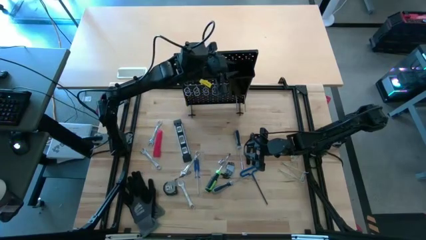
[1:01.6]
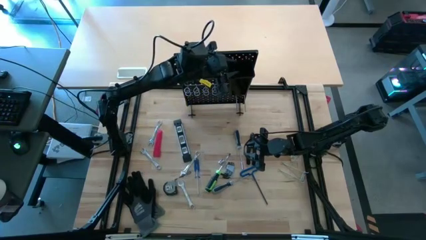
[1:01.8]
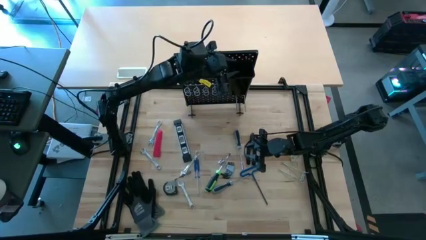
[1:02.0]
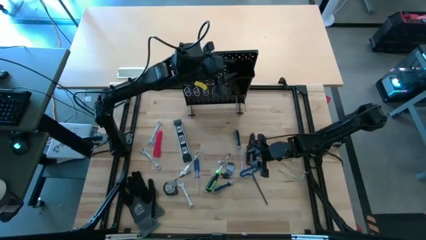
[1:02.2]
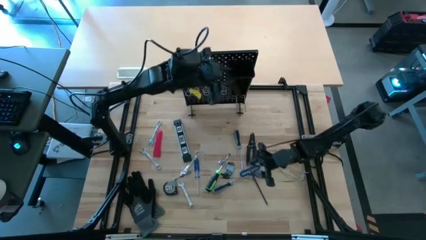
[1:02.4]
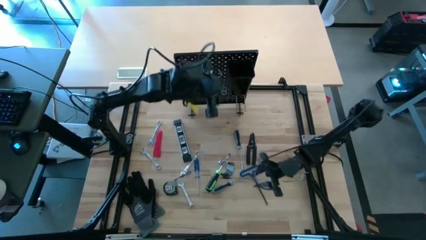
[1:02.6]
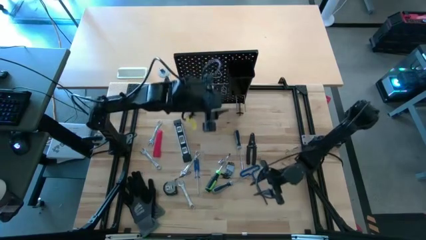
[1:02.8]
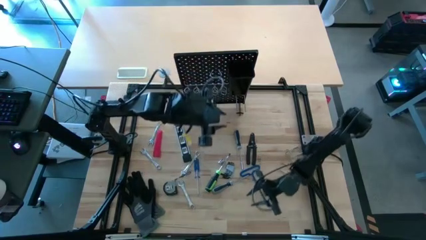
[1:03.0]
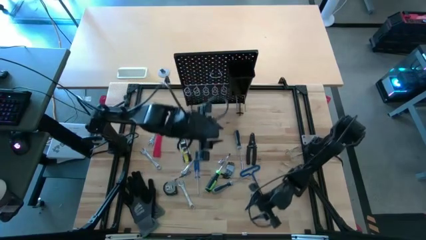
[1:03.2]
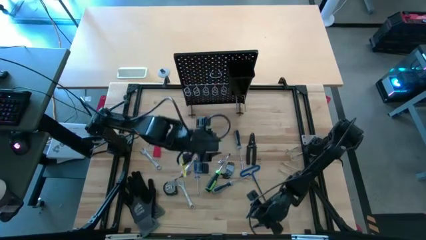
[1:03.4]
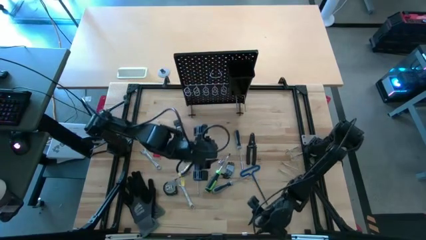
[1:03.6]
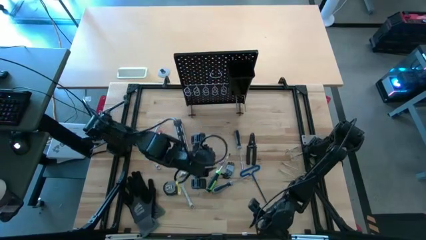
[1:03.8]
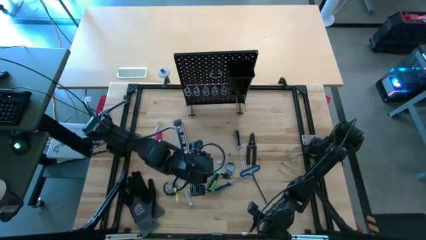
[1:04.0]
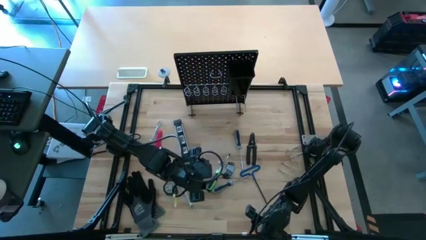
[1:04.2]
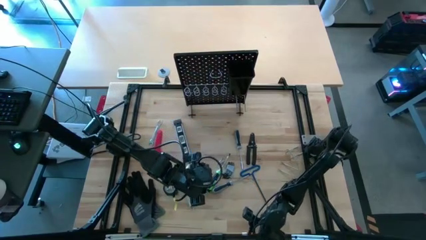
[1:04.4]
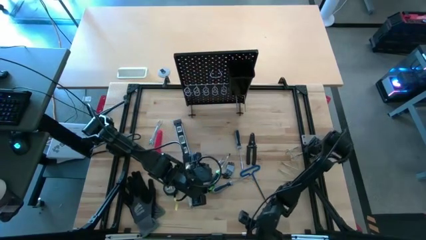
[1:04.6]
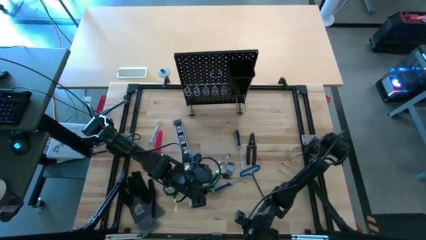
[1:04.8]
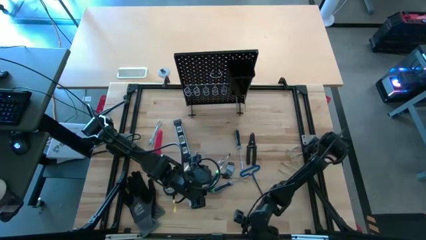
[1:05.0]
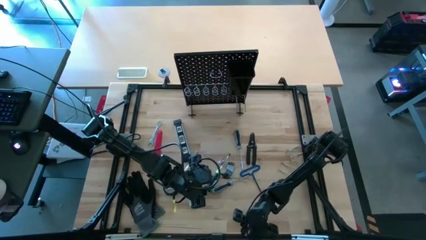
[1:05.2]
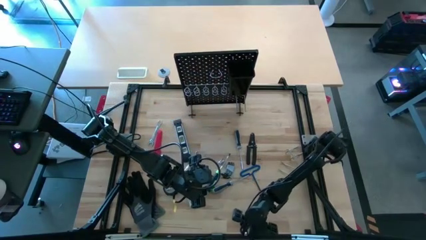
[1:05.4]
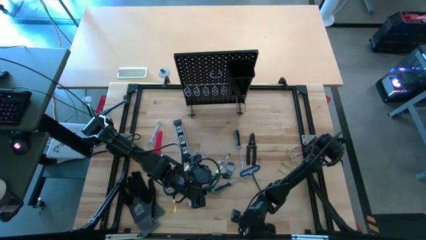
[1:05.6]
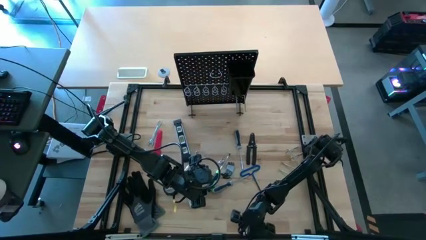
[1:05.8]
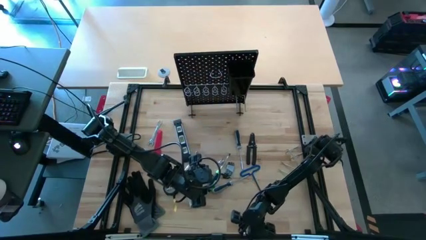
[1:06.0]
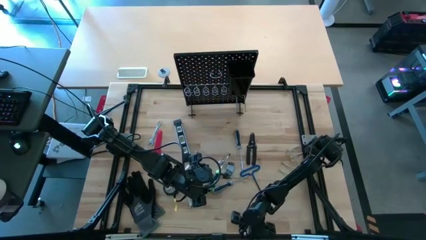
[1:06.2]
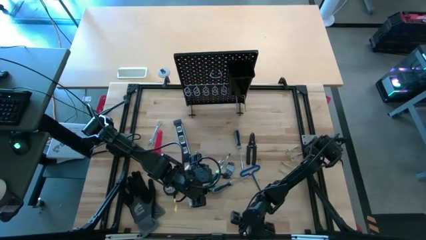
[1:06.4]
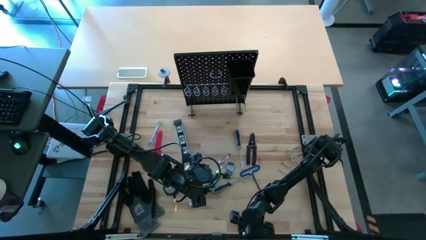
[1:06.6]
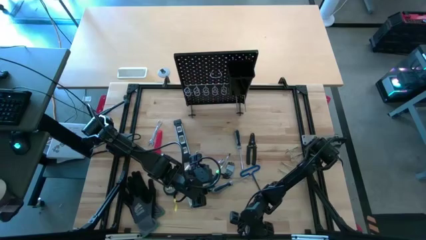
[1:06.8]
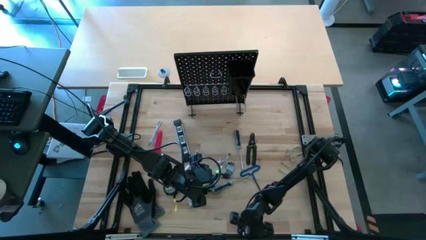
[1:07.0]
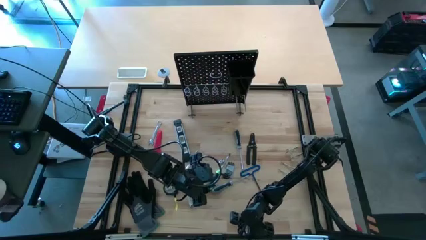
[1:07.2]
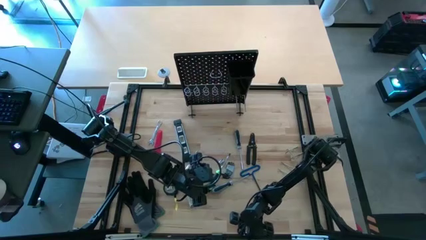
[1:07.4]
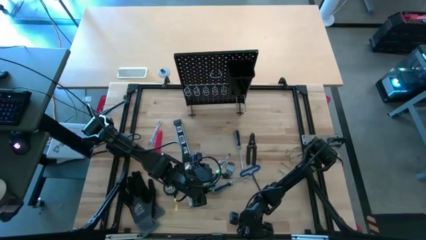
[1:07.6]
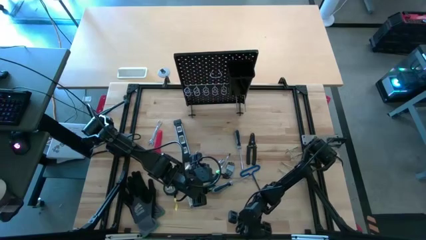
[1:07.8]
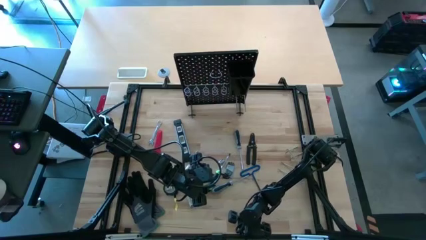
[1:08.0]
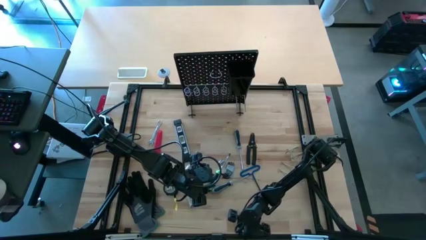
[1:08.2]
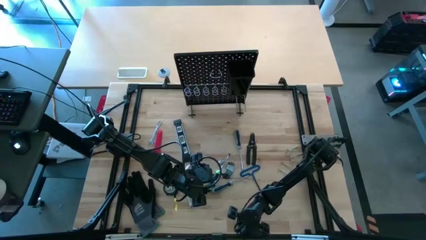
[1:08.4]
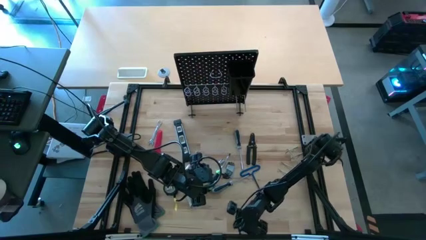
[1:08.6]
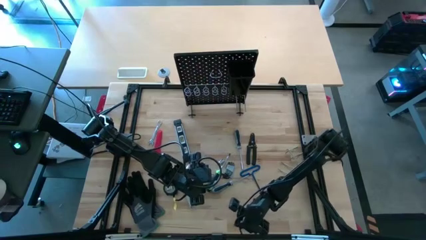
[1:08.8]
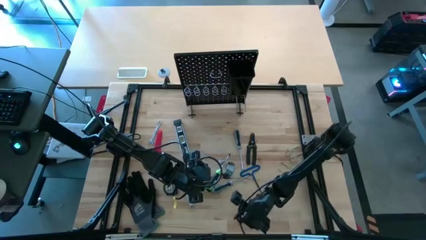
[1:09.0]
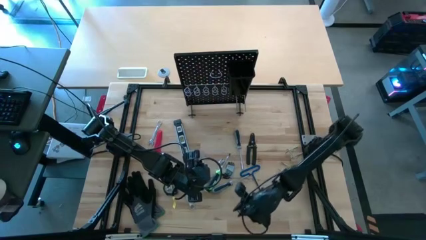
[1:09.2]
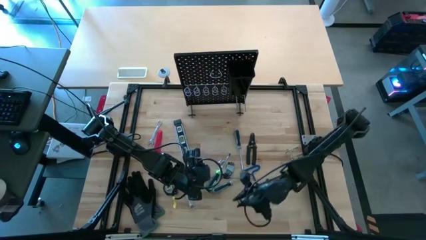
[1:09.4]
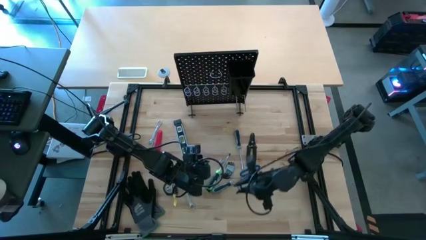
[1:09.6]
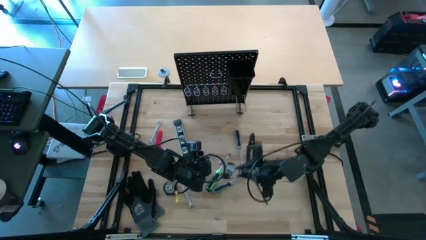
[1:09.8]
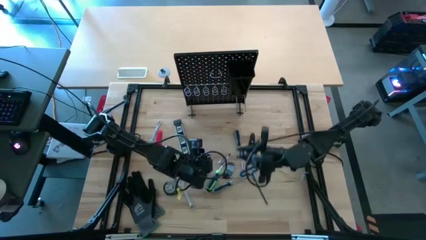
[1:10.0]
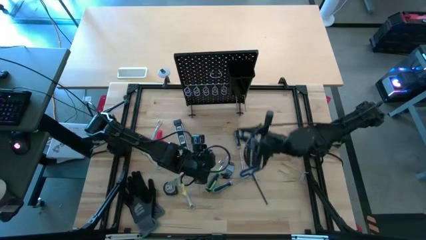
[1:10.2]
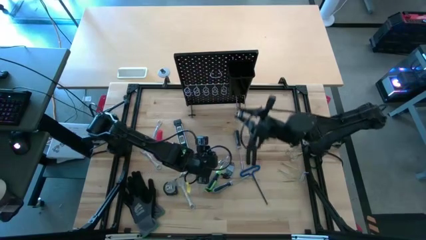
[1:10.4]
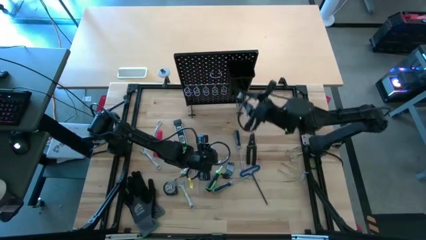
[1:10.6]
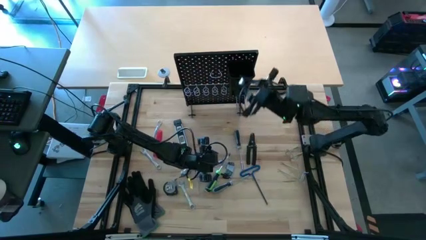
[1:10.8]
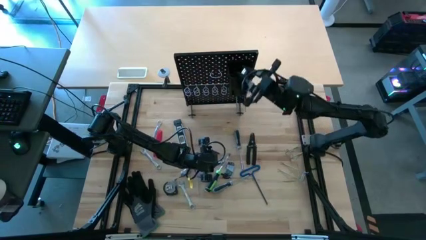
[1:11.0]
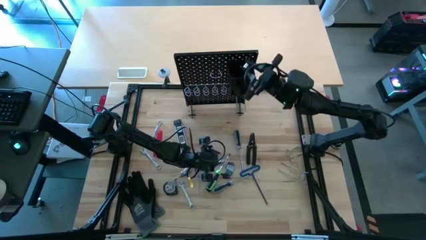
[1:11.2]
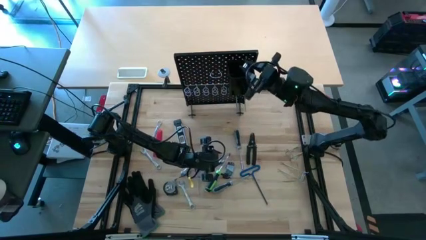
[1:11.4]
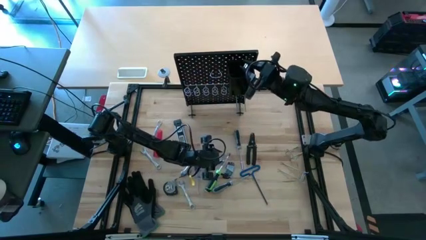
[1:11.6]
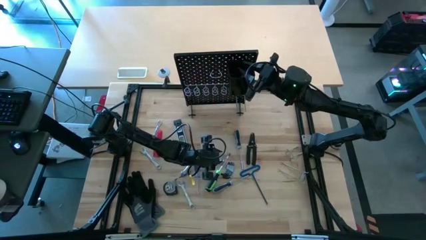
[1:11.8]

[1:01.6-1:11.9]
Task: Hang tools onto peg board
Put the socket wrench into the pegboard bin

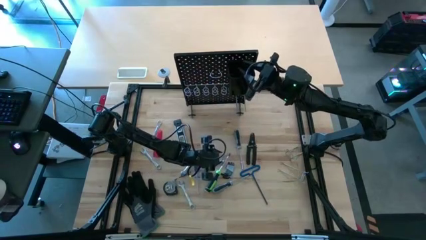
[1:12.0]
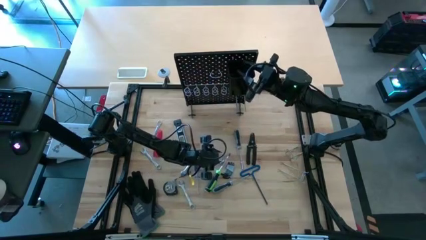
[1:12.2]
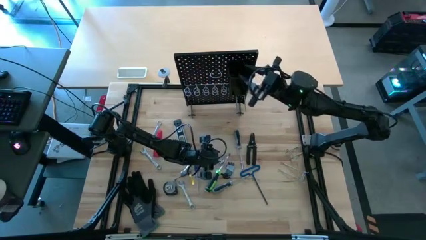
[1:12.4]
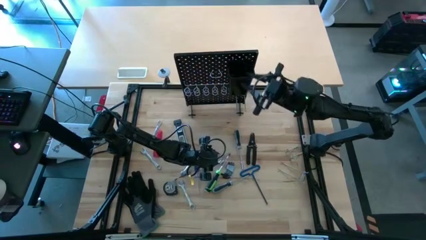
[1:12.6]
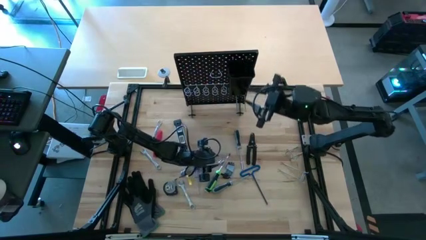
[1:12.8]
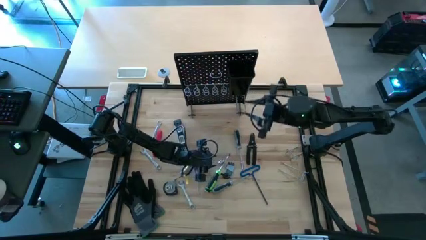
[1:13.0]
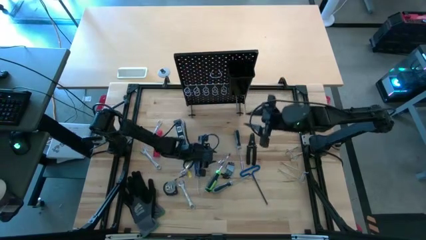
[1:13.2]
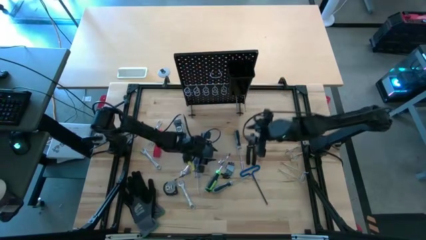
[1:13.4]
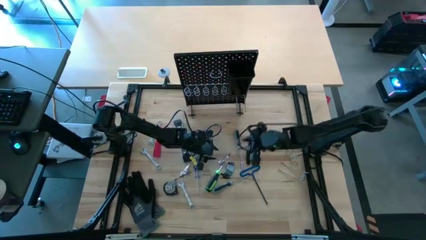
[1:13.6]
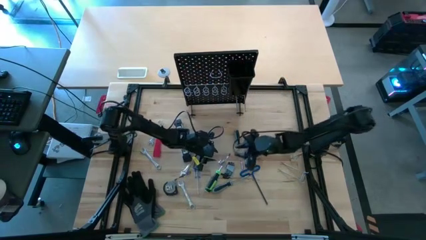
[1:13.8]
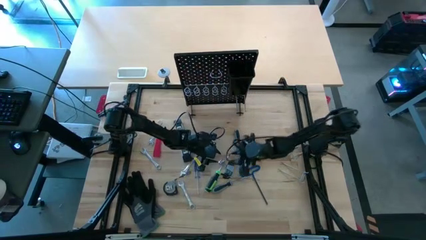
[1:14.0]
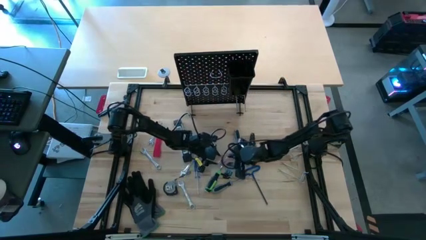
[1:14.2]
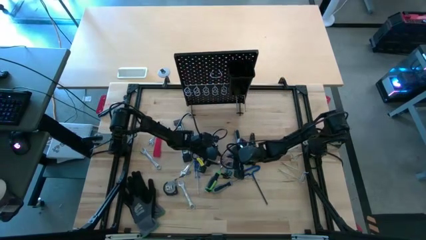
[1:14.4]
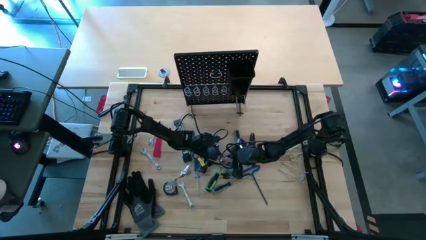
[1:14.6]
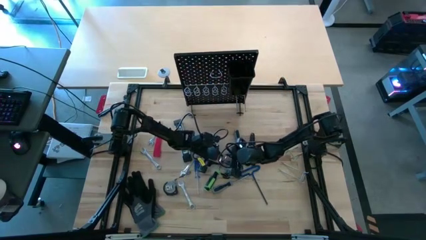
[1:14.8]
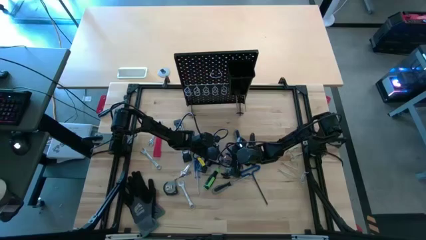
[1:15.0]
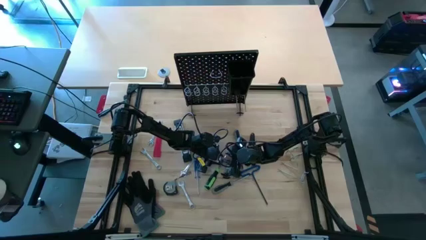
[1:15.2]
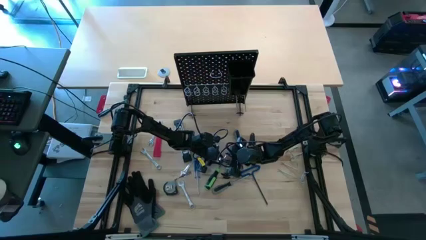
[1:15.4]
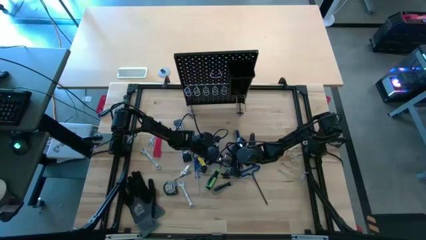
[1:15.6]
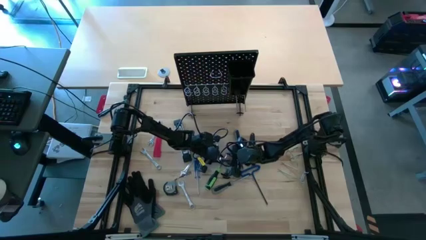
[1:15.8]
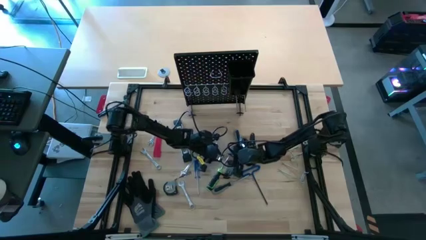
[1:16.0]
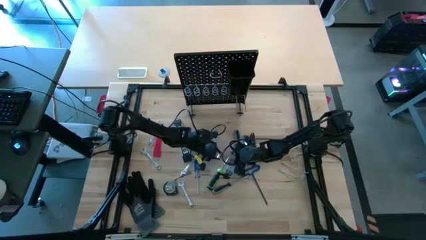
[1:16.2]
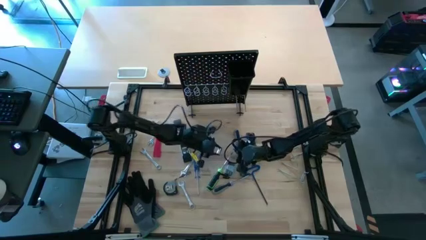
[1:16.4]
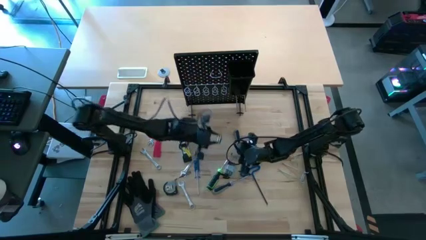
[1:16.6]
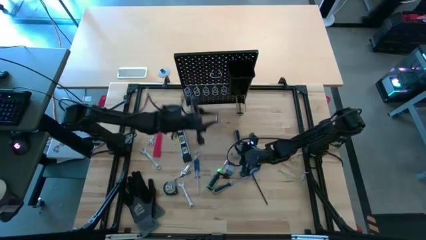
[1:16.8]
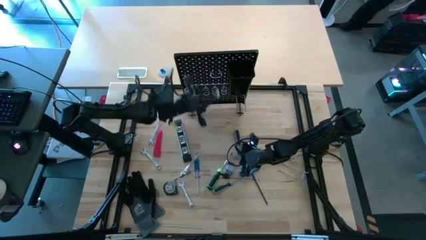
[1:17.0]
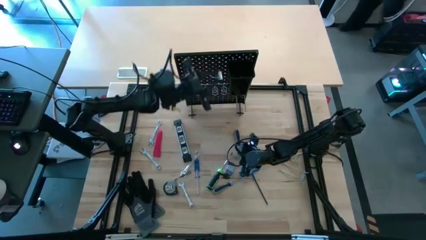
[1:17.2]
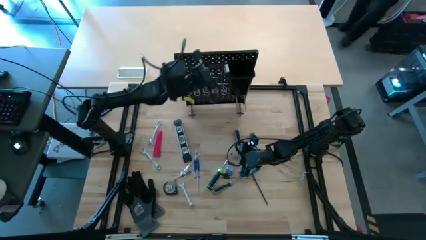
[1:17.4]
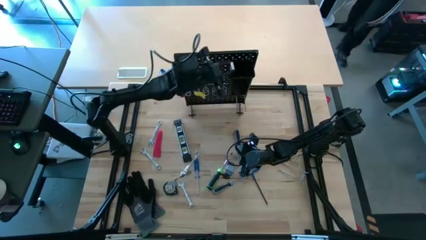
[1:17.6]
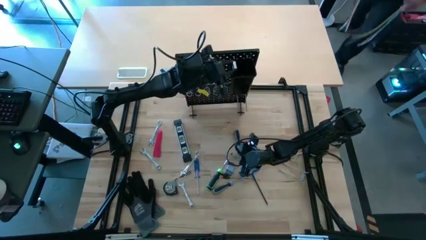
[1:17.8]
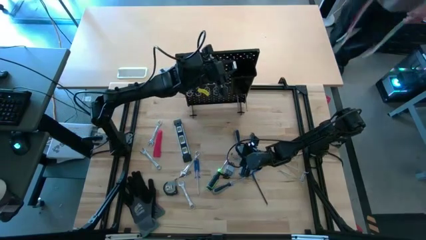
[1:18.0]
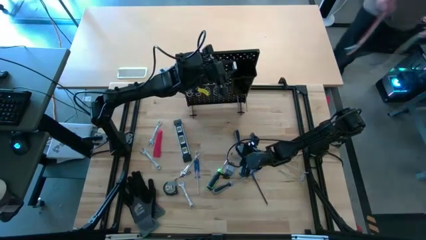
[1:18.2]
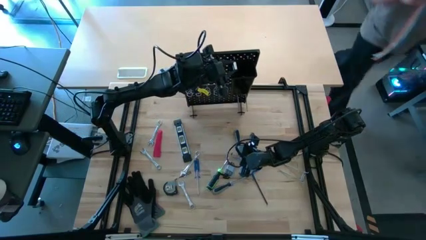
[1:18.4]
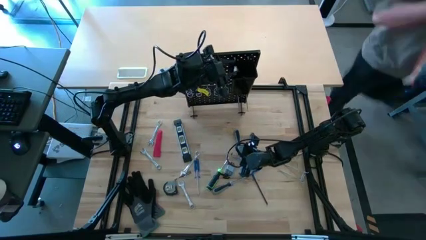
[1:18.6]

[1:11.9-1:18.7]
Put the socket wrench into the pegboard bin
